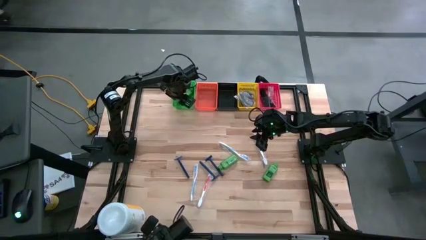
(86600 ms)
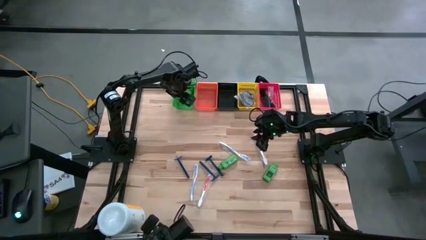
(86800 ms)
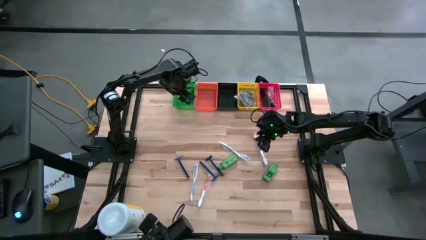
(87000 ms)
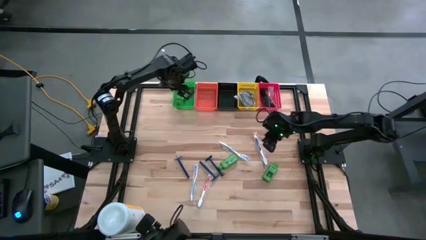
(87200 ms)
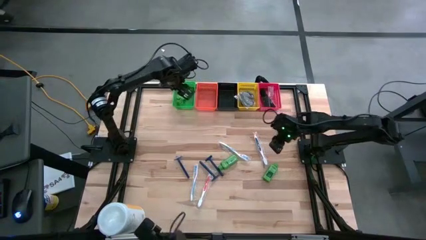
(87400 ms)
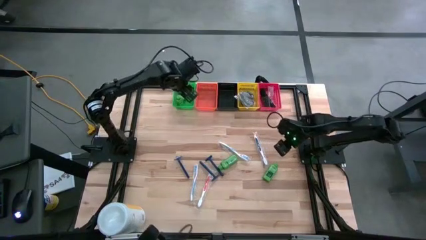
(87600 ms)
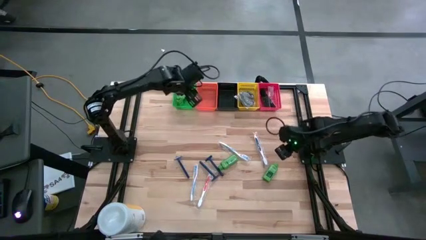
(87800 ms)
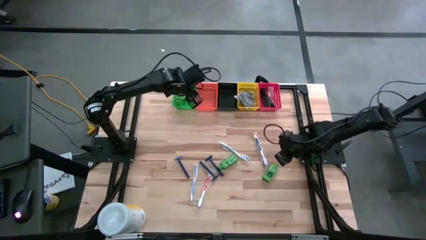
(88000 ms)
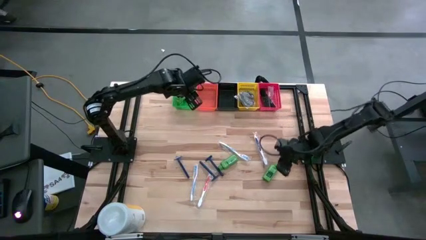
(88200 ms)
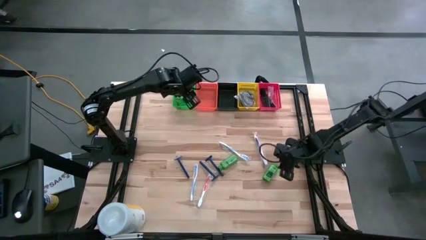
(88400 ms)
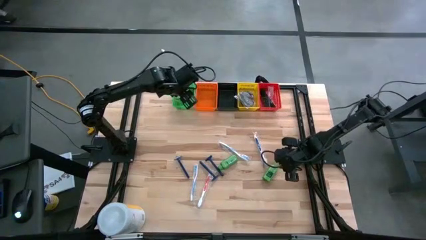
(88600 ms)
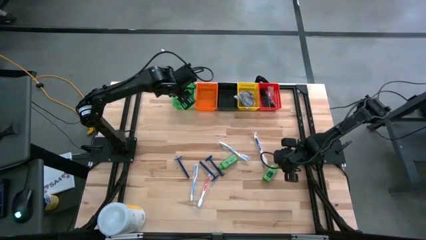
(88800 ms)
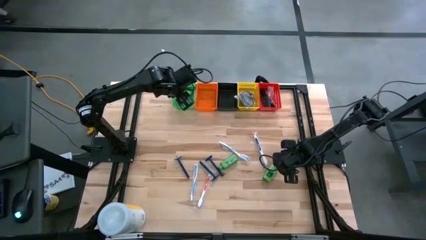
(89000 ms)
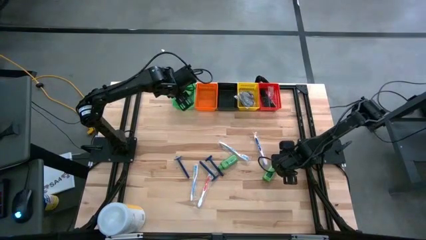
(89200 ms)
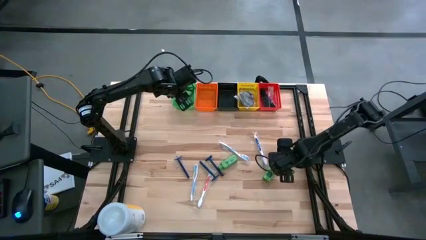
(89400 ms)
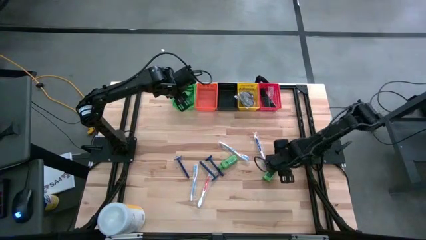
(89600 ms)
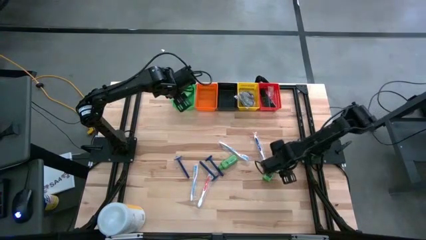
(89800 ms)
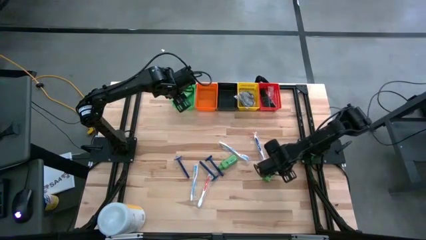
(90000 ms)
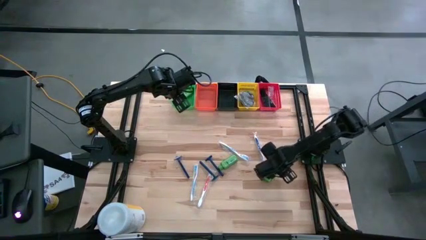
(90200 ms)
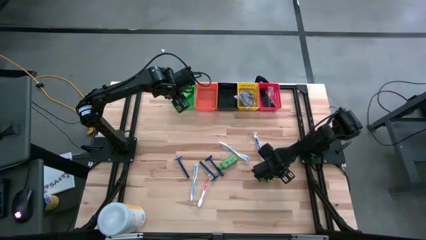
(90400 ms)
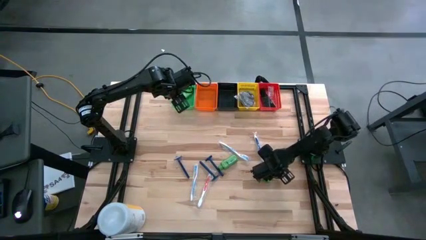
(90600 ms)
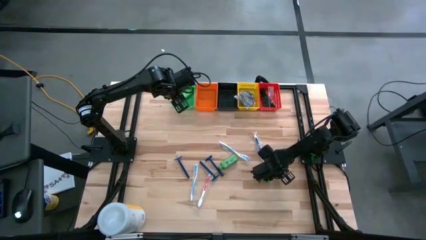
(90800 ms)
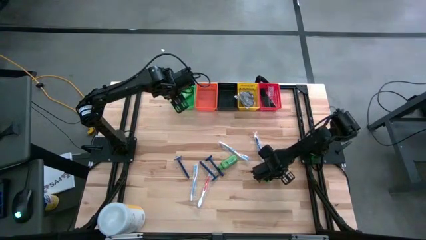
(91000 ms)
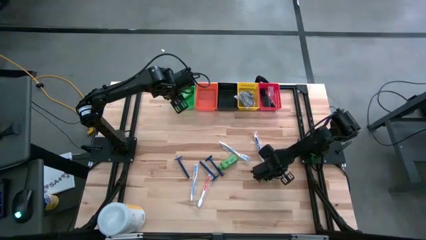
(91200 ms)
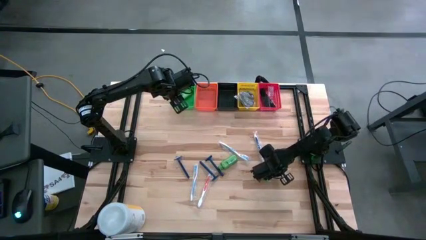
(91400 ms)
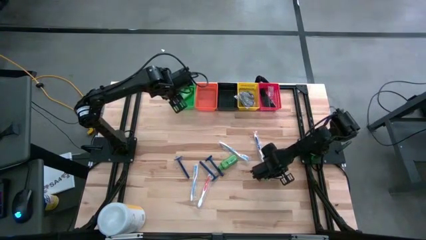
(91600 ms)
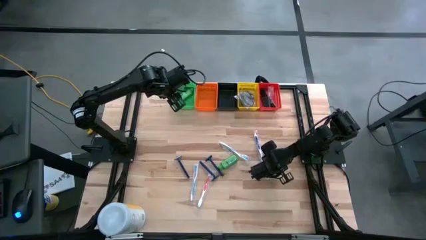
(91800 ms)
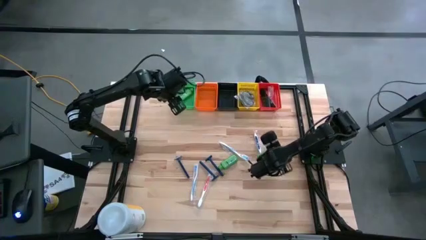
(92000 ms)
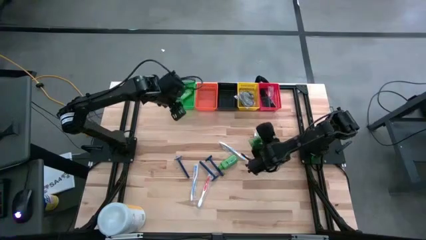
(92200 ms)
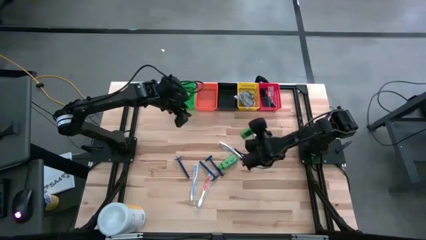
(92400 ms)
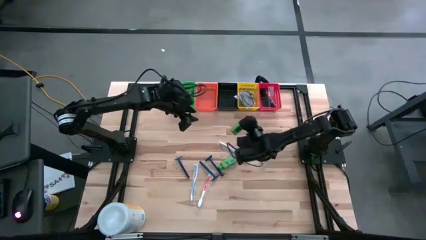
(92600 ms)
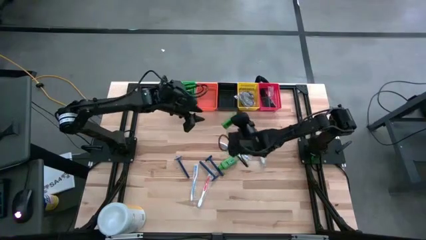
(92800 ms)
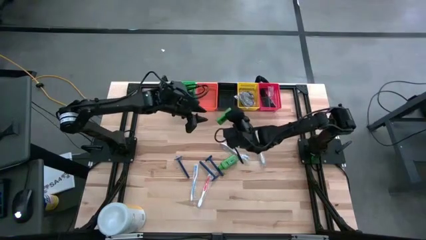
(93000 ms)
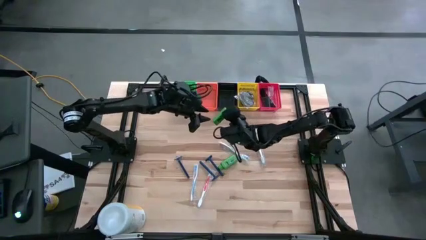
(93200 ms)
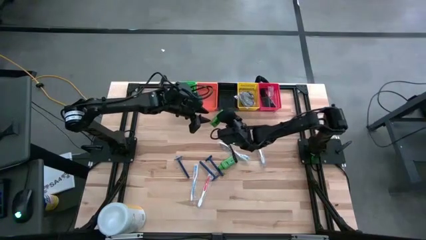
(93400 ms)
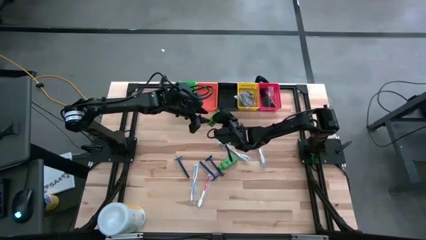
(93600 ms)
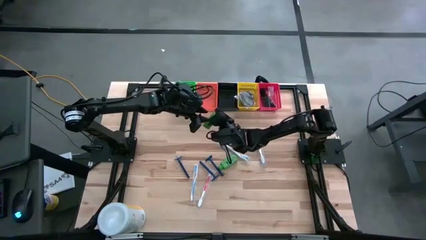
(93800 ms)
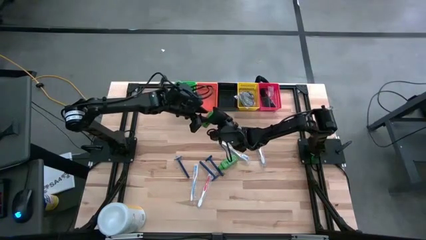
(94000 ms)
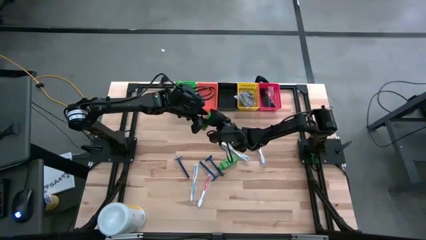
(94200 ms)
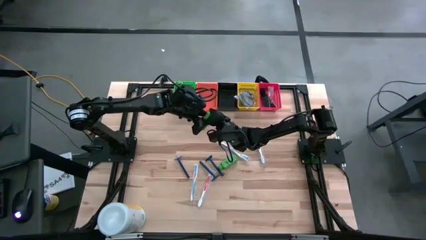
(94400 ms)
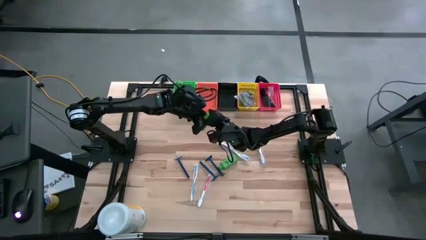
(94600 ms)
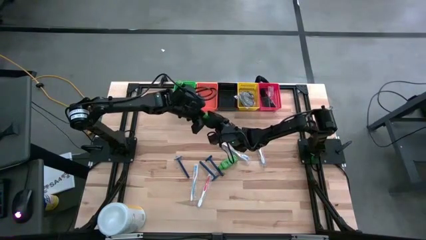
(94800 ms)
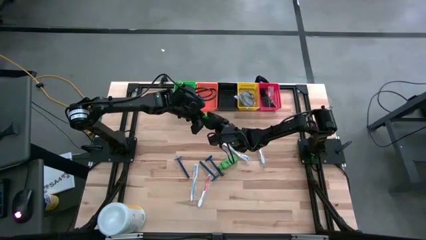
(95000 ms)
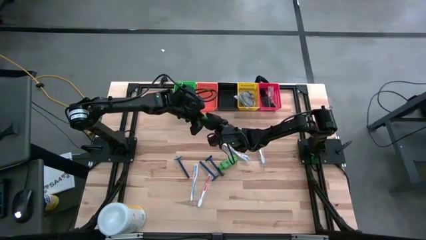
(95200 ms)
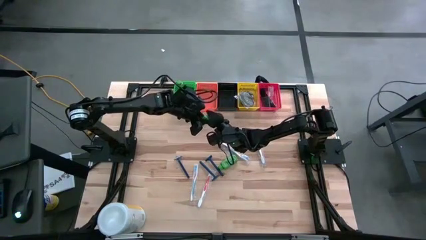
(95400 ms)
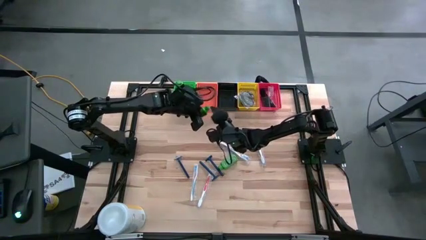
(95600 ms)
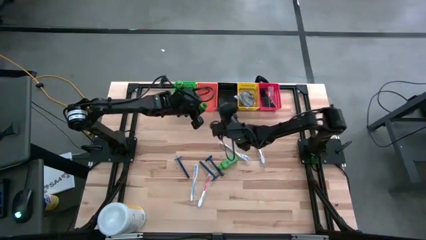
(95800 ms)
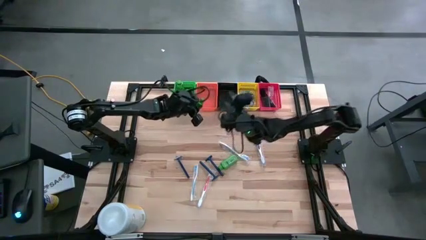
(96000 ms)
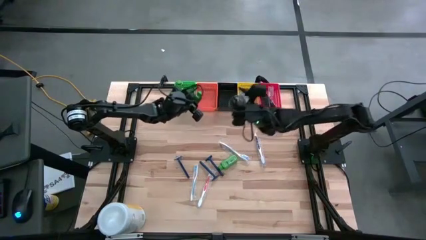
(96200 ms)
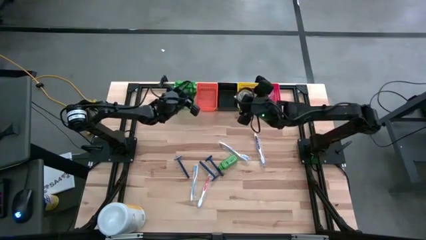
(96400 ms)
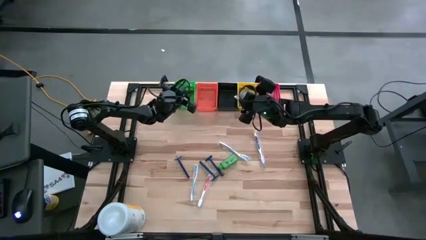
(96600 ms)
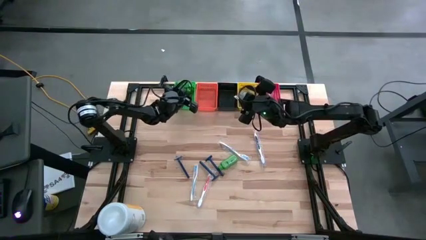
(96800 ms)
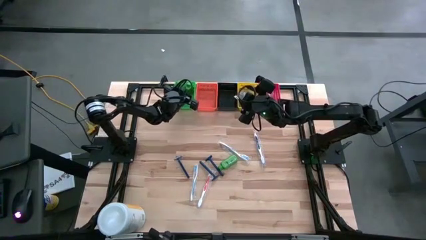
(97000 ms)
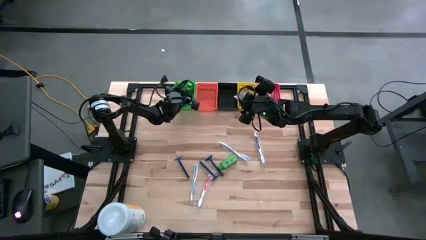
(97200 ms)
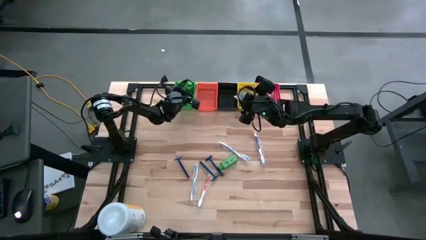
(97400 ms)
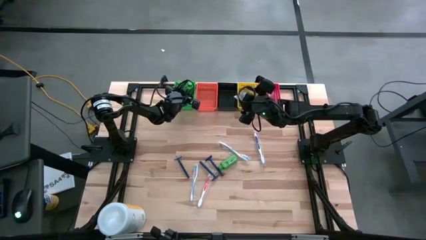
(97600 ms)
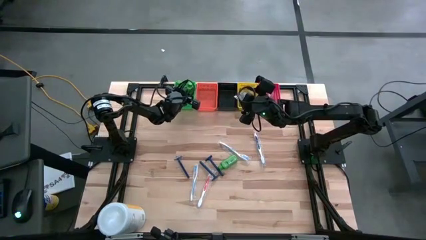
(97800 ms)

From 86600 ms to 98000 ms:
Task: Pick & Place Travel size toiletries
Put the green shampoo bottle into the green bin

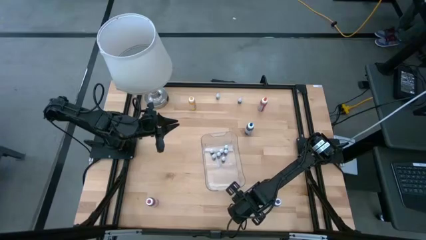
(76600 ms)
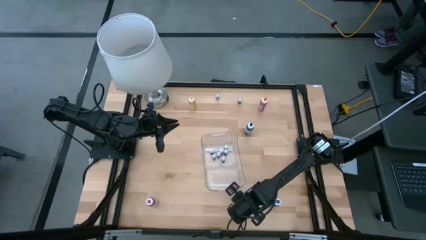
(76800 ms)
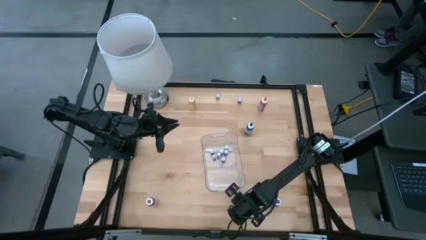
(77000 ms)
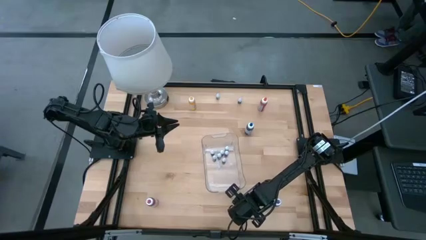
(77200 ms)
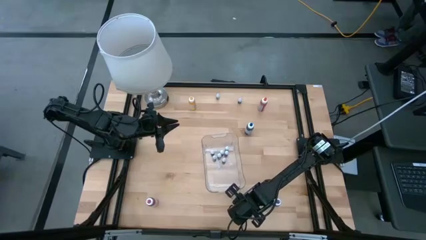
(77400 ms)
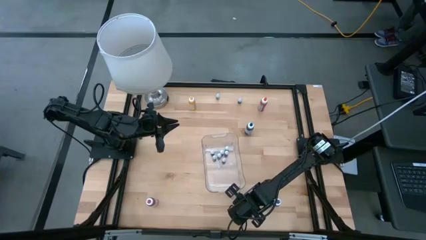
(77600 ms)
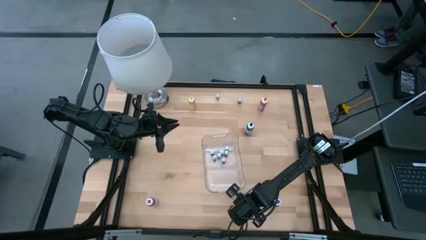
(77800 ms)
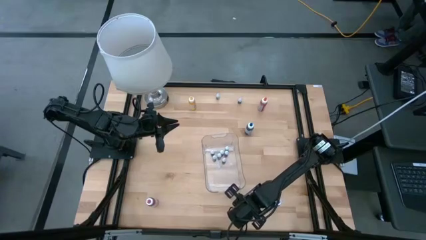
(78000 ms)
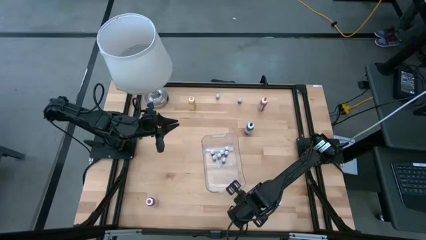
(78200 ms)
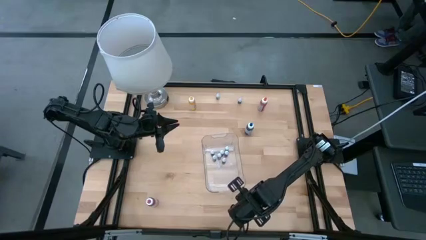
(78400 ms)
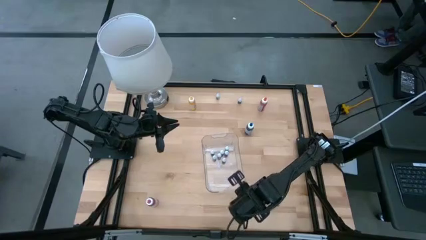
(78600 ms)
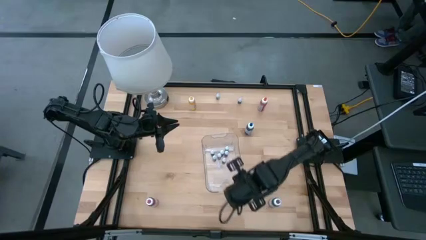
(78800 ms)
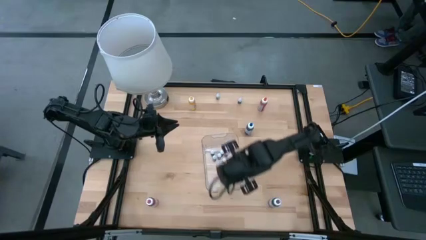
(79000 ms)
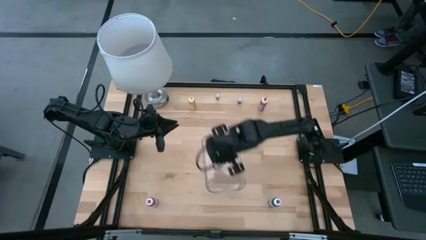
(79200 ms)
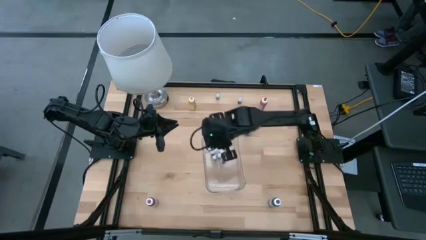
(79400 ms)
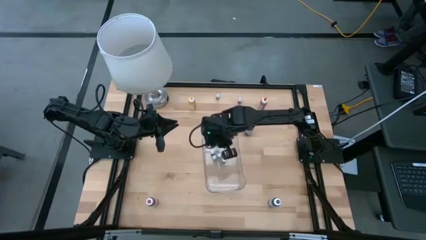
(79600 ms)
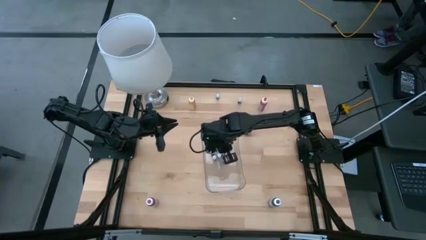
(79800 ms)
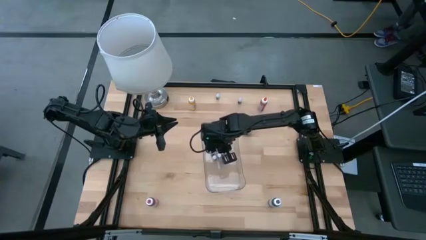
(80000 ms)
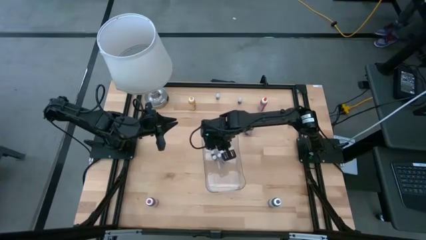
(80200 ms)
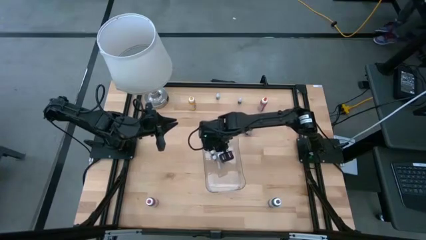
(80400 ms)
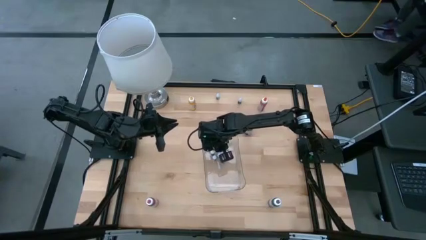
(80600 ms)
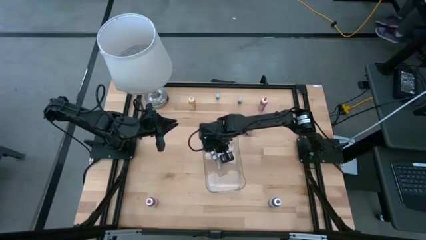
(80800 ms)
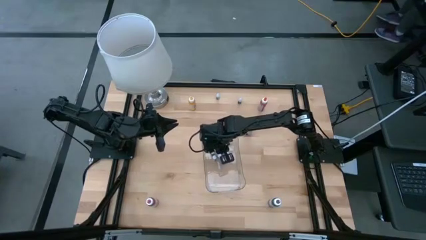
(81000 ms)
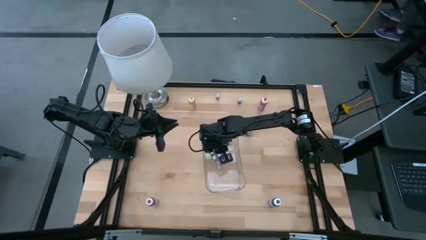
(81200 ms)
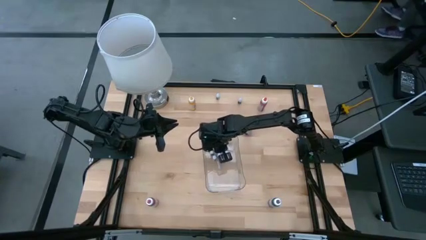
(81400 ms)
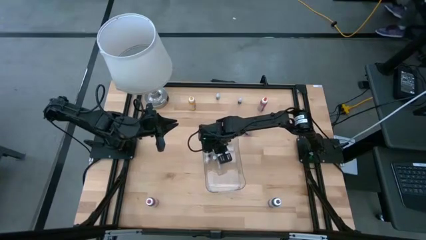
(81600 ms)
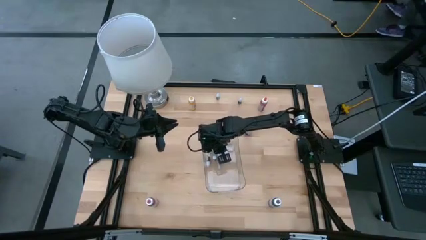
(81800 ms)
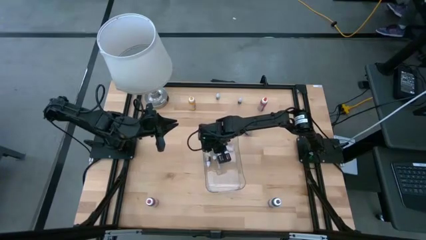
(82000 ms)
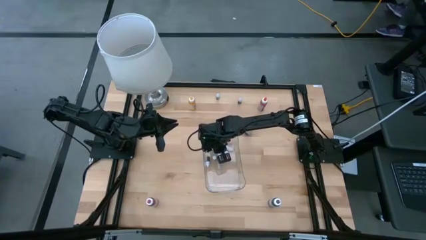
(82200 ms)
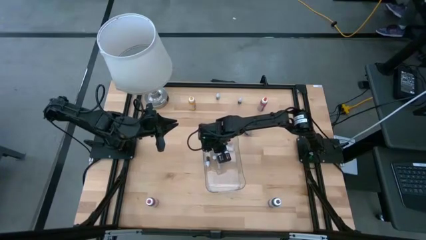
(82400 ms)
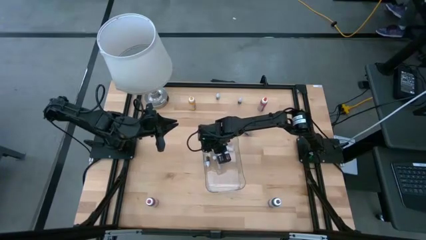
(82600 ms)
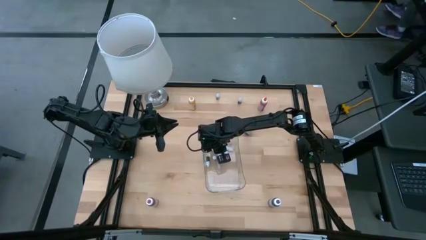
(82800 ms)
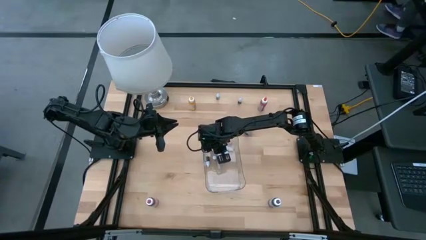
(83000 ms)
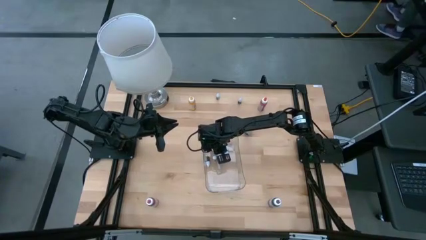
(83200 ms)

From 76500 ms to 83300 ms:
Task: Pick & Place food coloring
Put the small brown food coloring bottle into the transparent container
